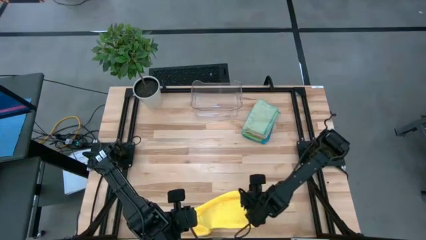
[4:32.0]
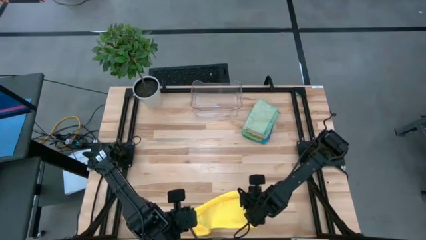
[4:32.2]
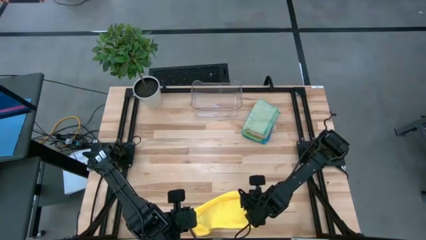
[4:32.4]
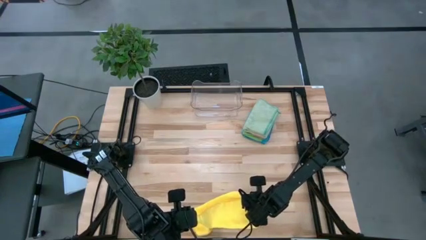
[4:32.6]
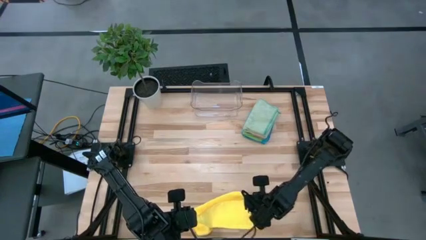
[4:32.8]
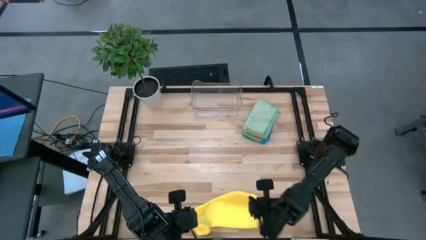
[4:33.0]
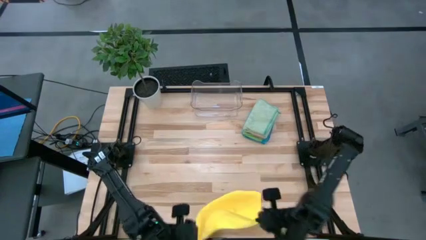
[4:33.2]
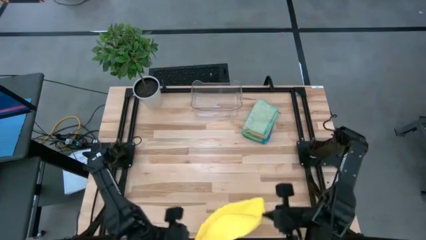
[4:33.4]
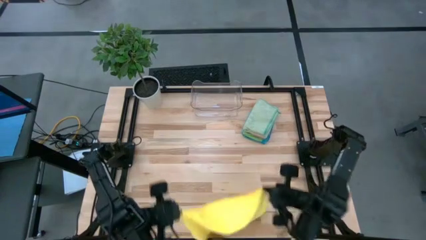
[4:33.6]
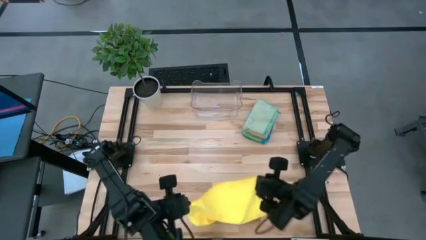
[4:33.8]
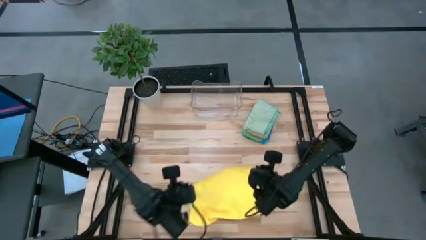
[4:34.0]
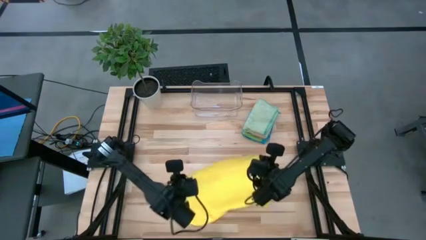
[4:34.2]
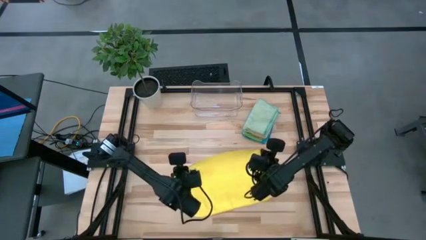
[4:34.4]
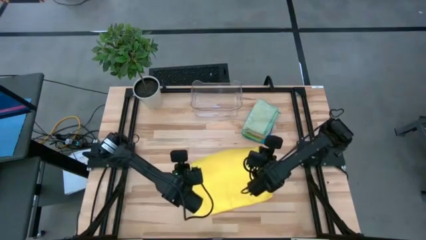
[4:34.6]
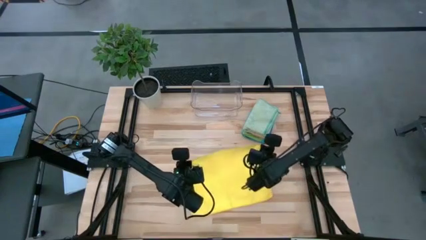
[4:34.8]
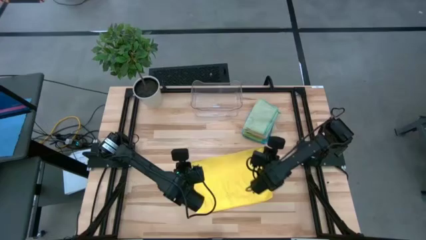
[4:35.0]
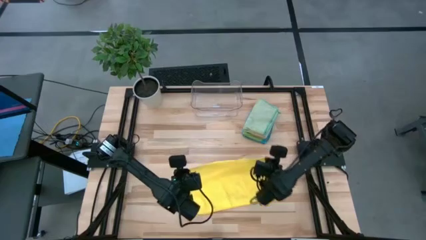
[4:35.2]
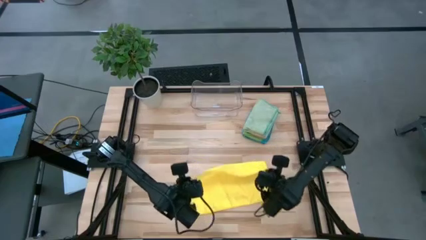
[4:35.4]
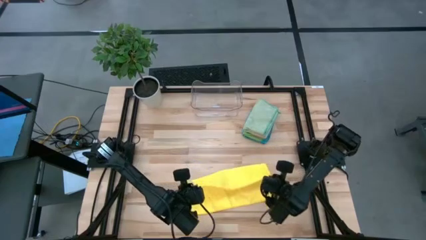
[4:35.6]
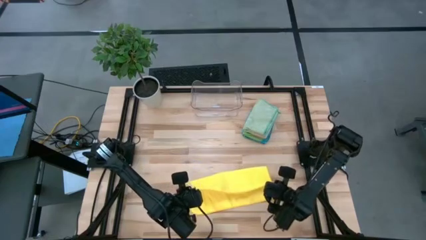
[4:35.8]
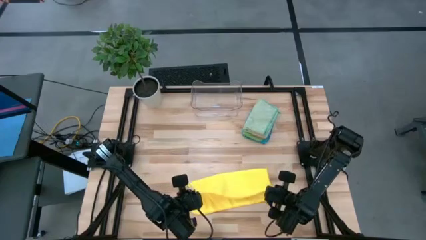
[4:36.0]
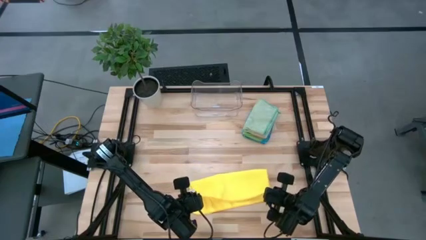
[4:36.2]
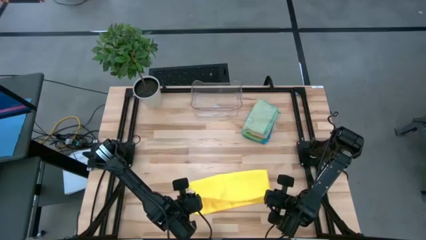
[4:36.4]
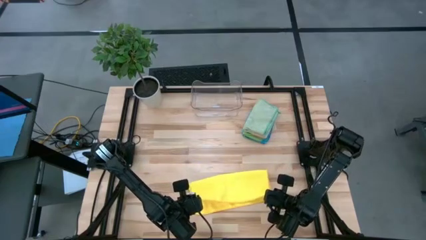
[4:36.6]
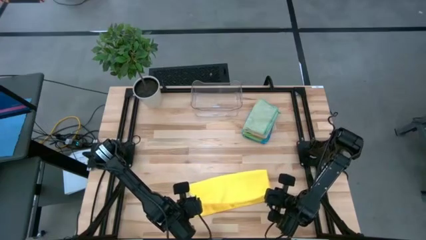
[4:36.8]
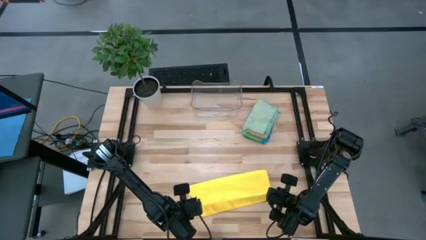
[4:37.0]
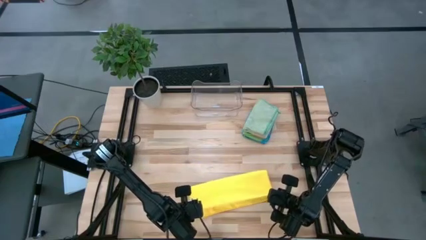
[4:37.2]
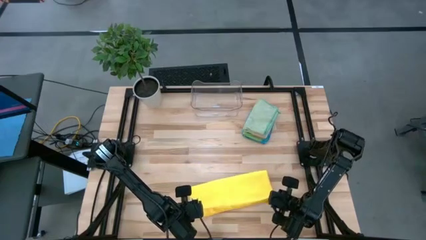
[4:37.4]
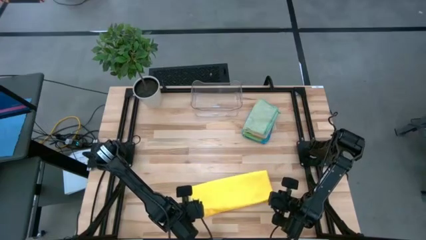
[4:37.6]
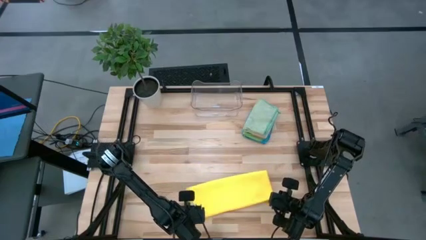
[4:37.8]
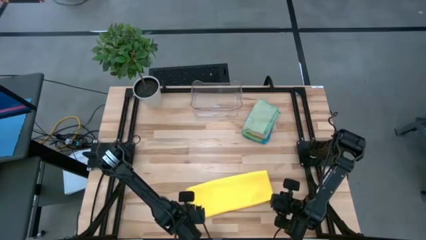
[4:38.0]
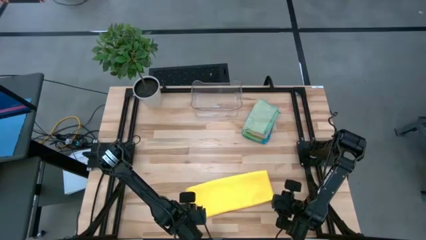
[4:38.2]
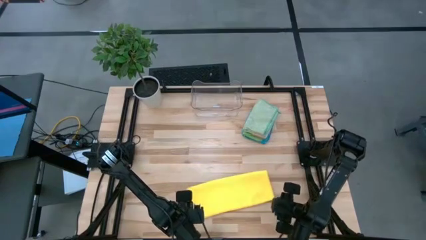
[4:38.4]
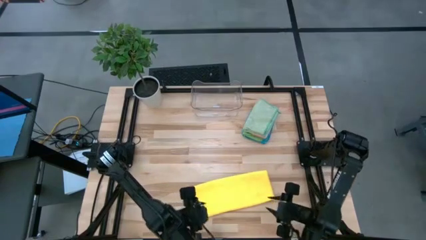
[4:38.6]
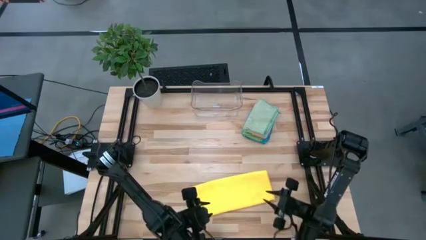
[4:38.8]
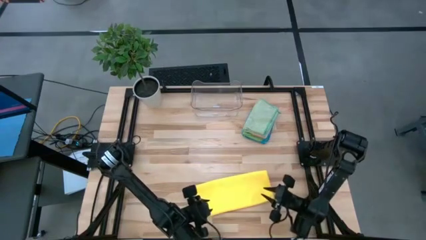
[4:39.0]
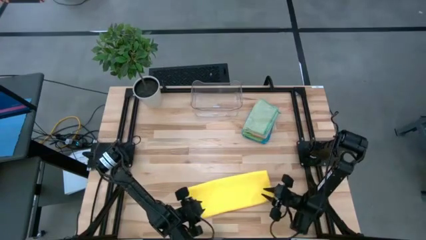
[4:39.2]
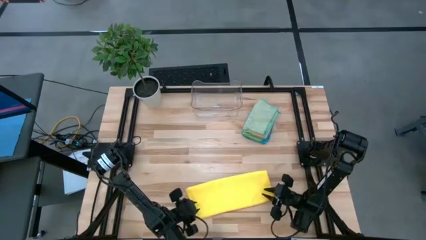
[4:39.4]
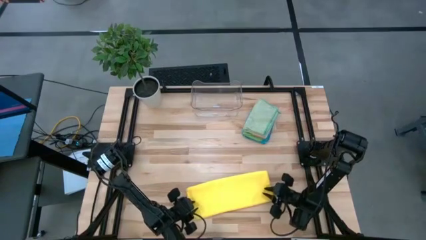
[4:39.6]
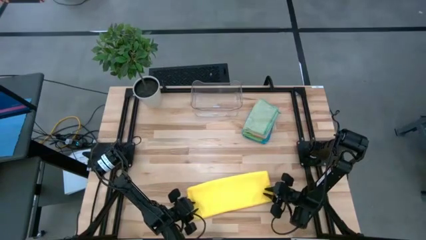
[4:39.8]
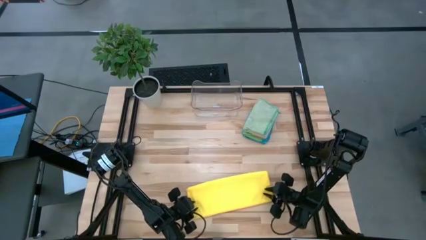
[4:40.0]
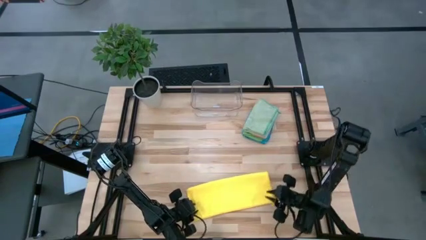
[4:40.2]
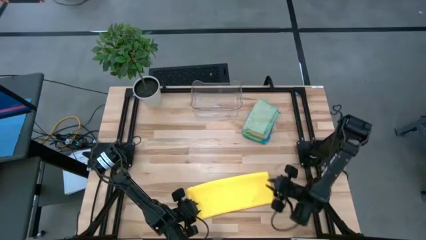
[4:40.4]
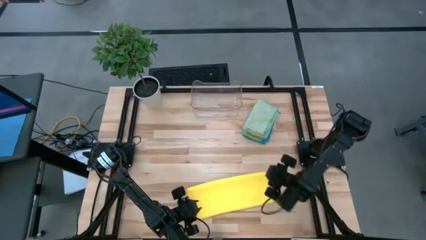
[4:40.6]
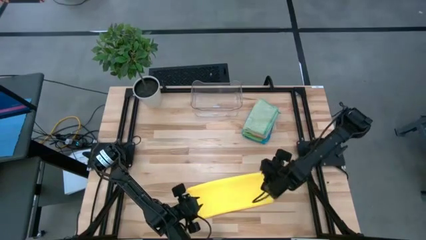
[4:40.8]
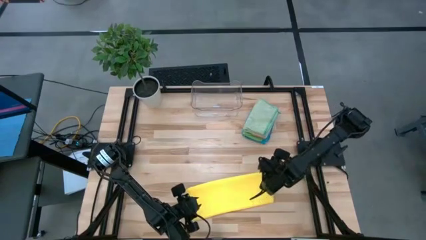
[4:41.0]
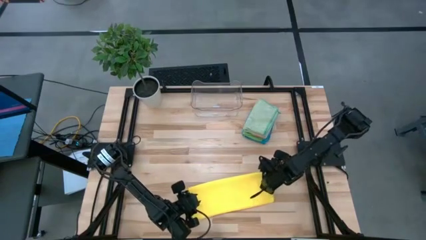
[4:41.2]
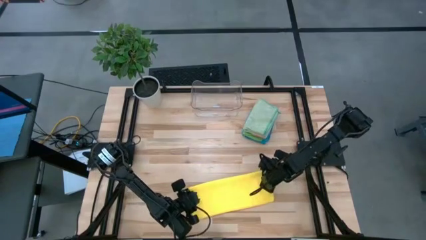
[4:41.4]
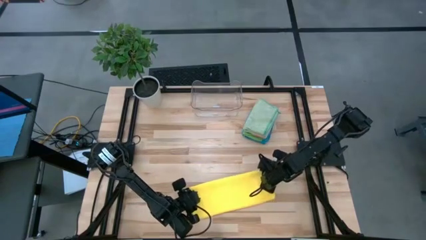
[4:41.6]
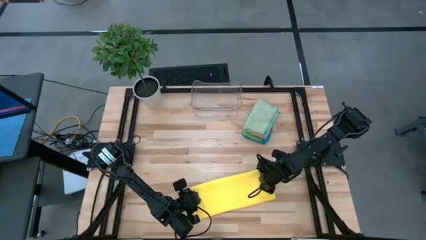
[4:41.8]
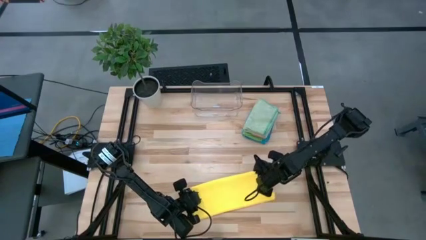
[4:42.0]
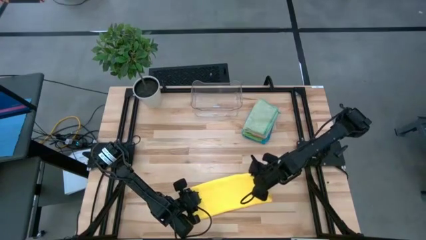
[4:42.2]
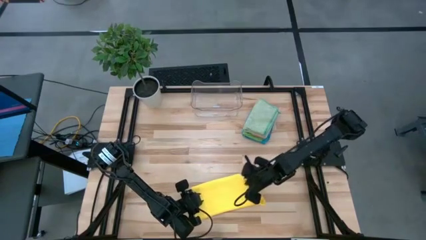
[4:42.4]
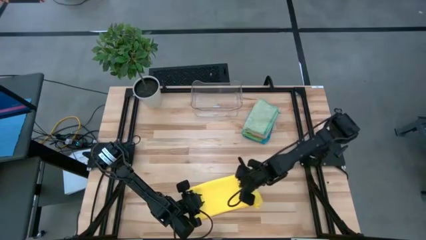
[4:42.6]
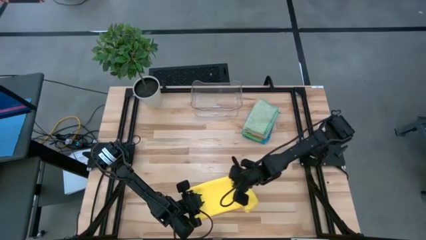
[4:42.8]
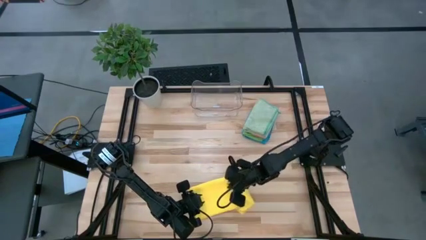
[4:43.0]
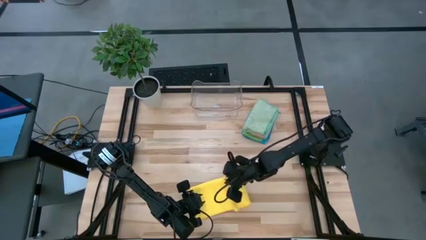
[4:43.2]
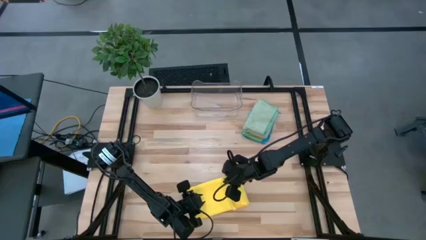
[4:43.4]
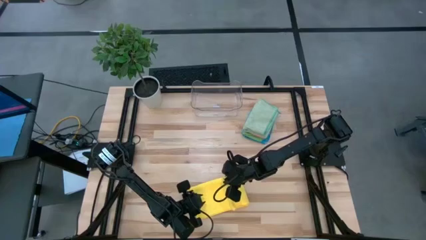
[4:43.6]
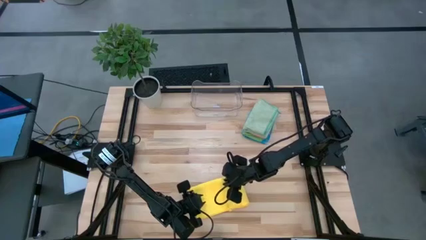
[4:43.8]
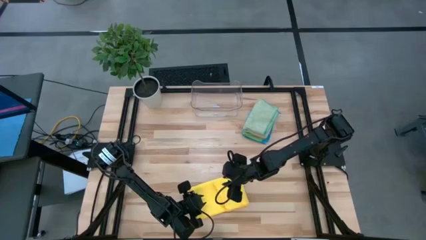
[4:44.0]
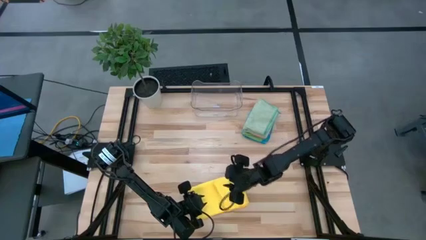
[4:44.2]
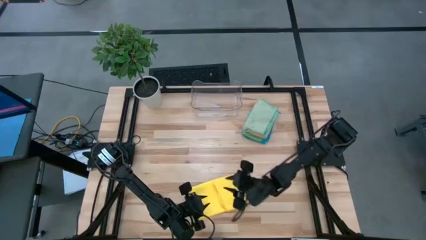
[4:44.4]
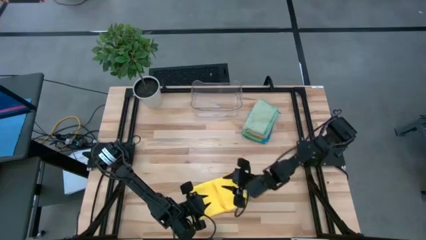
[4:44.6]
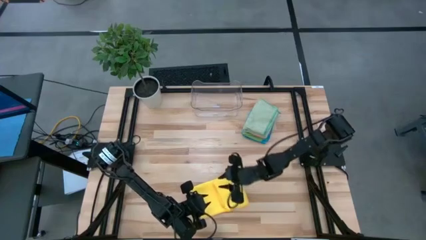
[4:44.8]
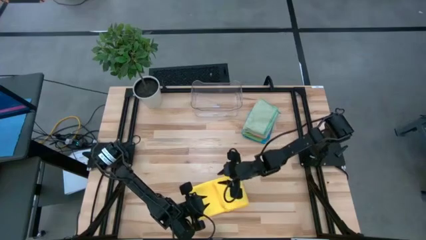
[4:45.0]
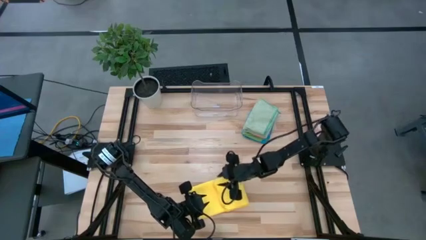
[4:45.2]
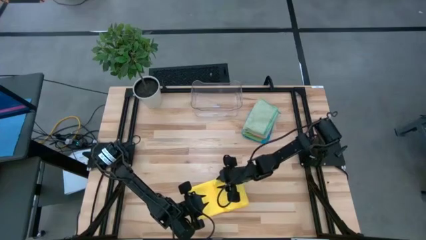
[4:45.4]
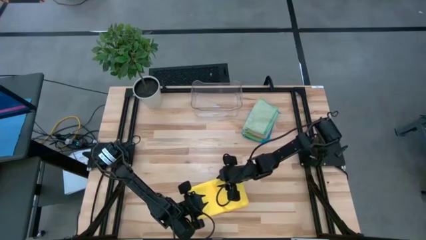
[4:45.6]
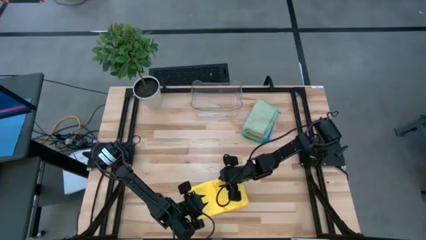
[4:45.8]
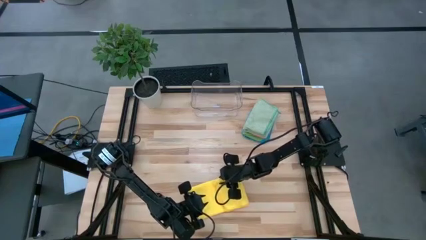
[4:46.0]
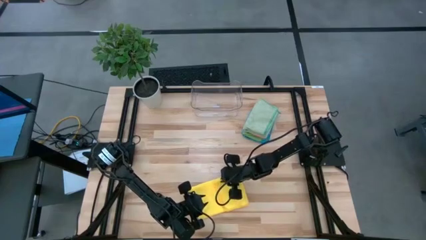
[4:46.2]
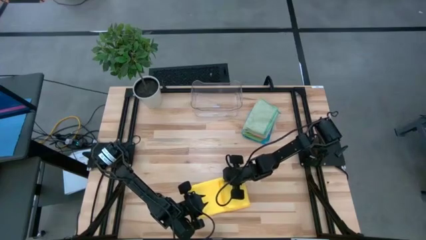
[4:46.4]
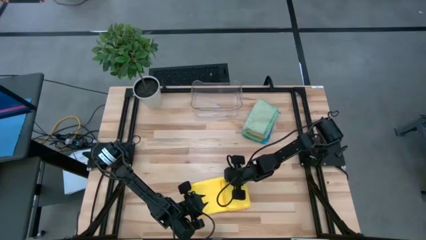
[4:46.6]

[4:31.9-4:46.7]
Task: Fold microfiber towels
Fold the yellow microfiber towel
